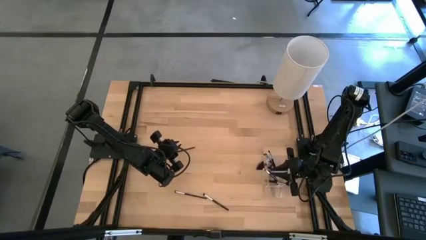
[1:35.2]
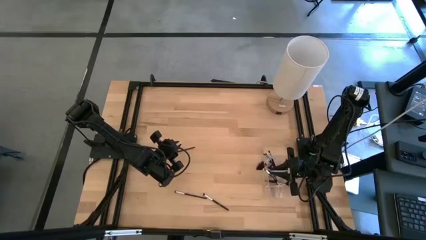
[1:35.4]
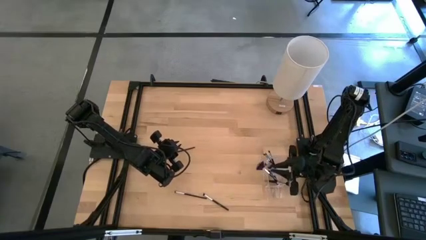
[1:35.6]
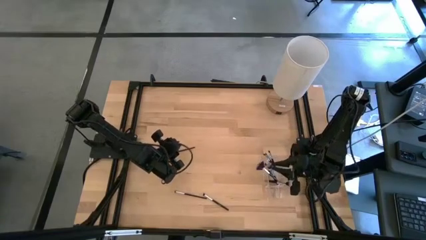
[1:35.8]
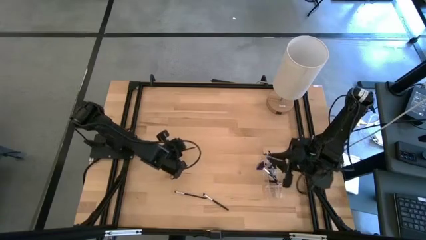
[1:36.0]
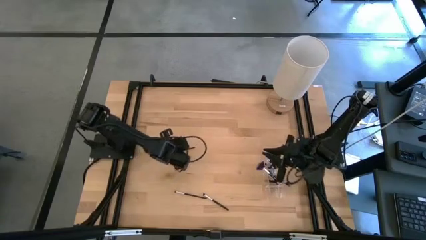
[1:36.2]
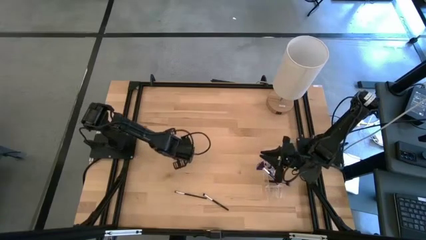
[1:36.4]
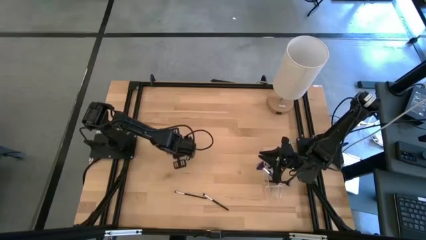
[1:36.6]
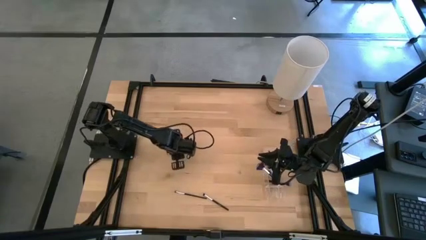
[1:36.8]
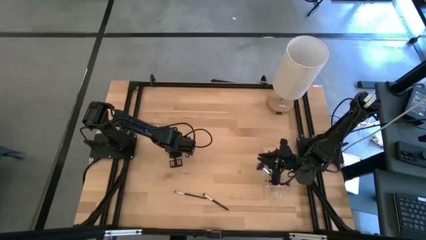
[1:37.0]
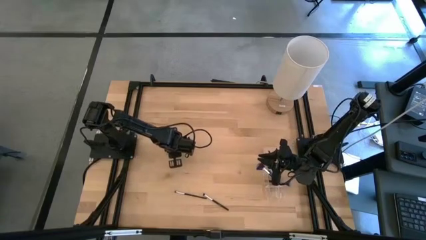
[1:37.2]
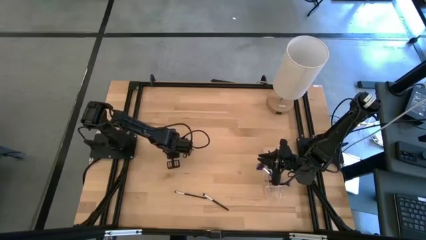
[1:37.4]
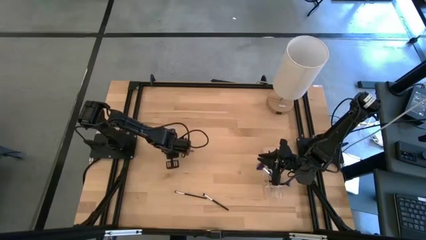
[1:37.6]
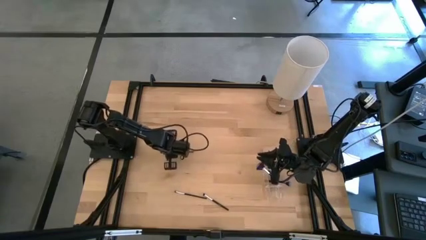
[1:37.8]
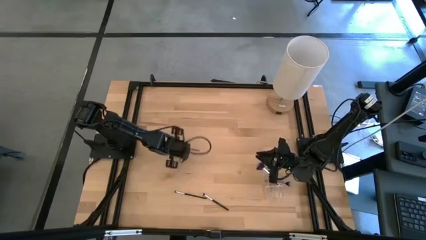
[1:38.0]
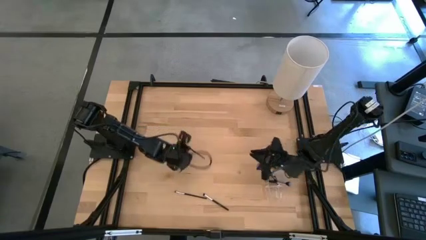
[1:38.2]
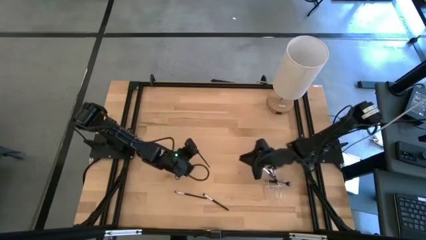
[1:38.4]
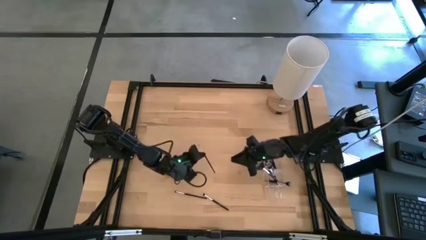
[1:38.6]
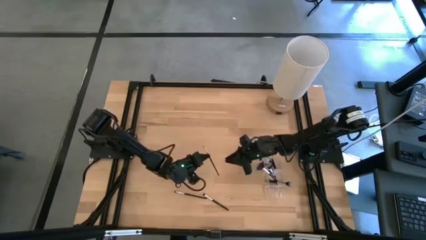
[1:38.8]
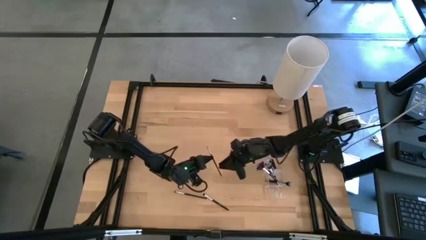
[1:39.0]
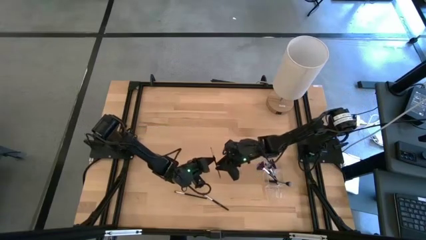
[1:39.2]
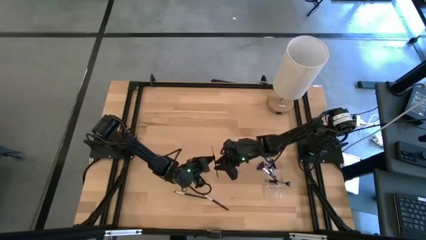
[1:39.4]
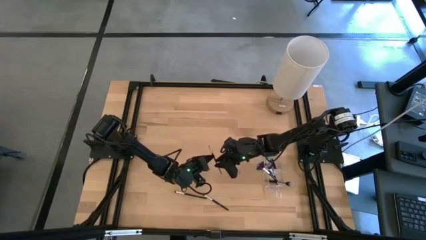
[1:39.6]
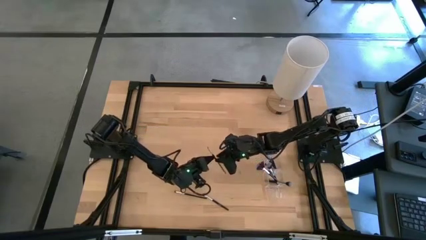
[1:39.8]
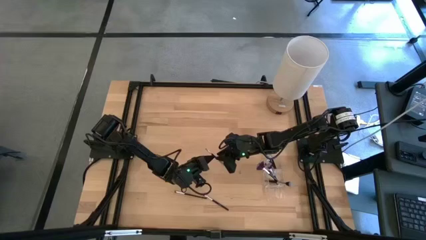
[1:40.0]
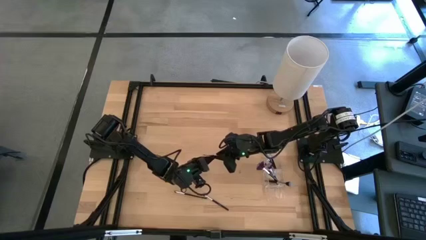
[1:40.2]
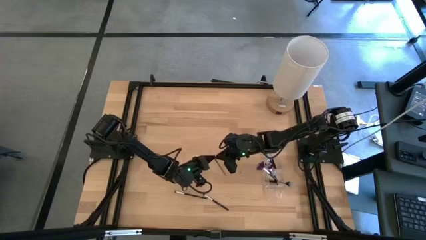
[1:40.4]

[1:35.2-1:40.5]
Task: Put items in baskets/containers
Put the liner brush into the right section of the transparent organizer

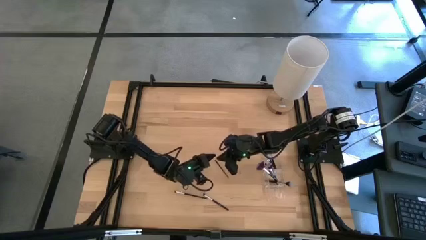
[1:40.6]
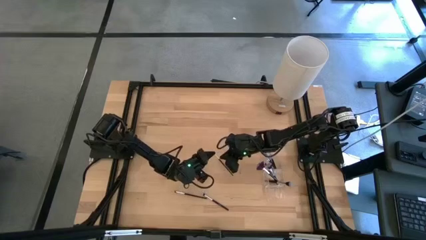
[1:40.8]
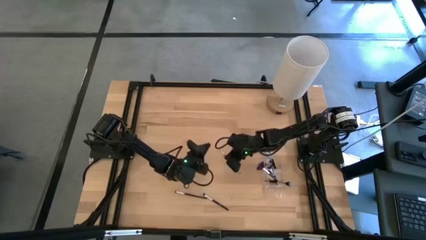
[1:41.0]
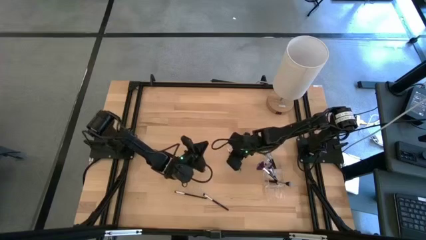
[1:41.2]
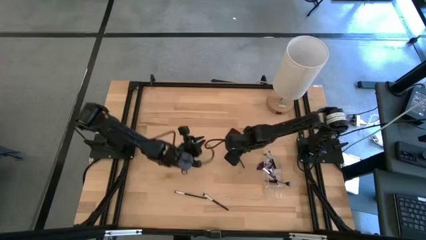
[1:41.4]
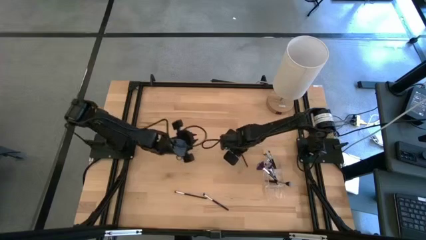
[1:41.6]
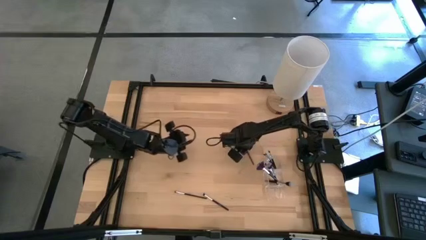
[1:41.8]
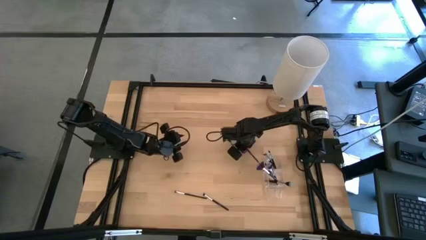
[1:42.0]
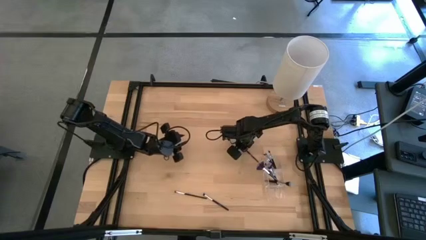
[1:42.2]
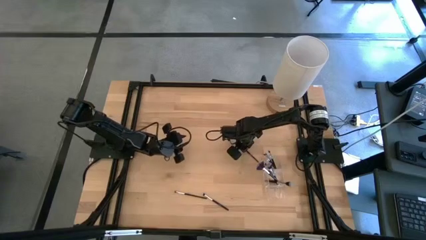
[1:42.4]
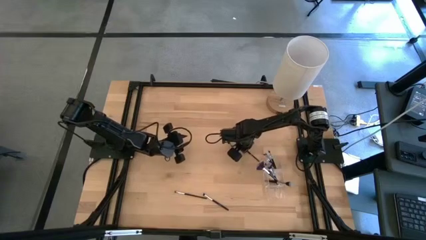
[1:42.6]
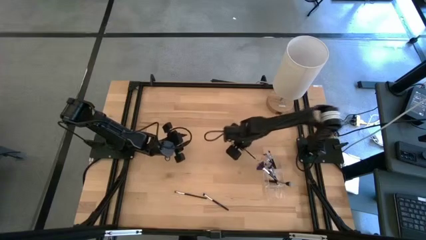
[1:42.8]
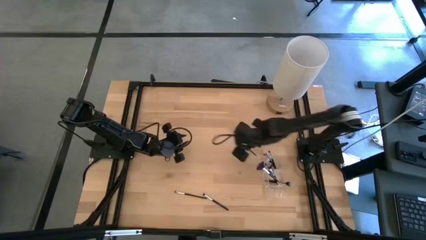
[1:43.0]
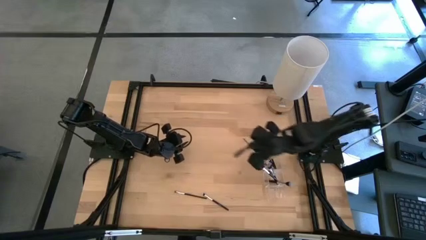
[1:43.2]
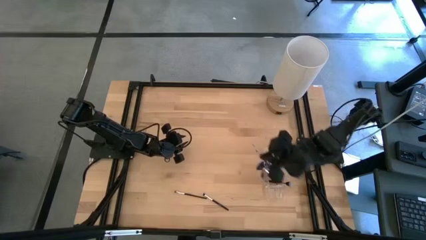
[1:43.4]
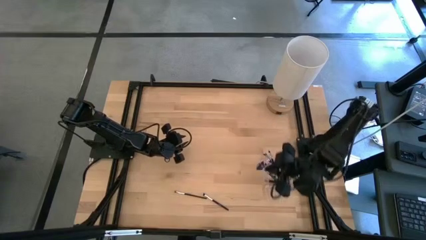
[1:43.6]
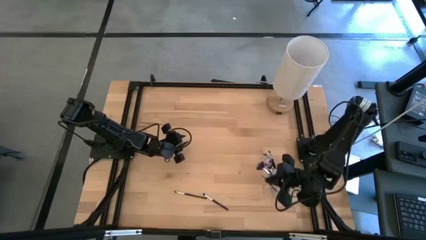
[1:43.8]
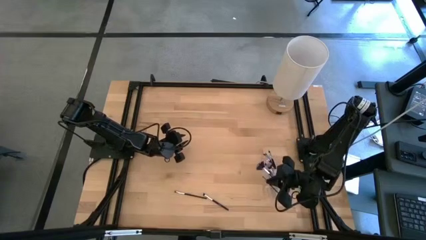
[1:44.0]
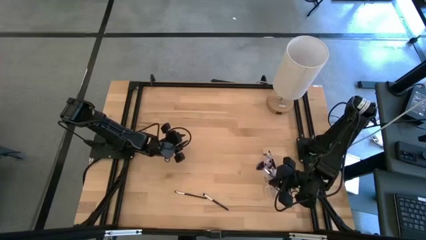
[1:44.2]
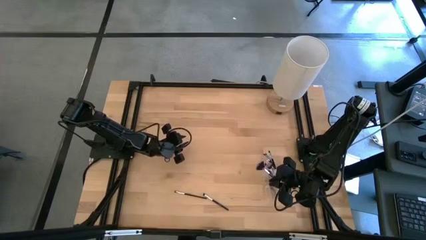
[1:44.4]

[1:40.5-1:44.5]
Put the paintbrush into the right section of the transparent organizer

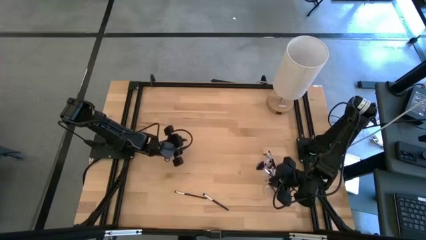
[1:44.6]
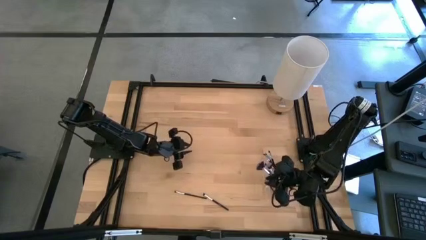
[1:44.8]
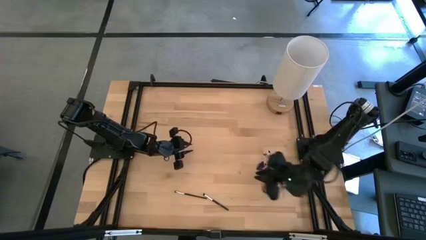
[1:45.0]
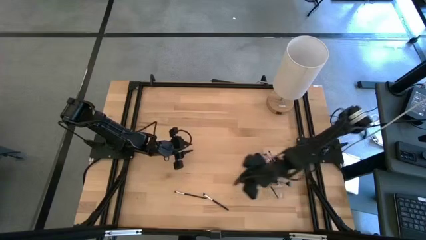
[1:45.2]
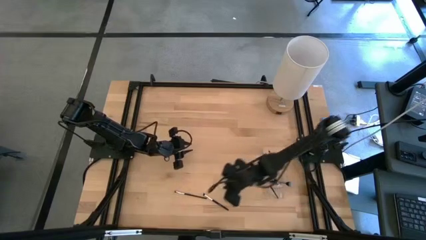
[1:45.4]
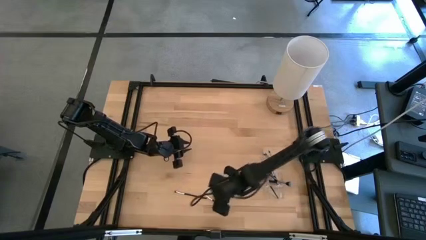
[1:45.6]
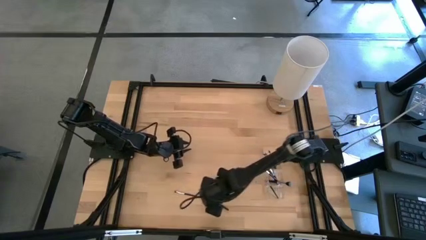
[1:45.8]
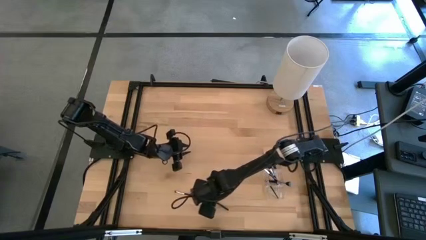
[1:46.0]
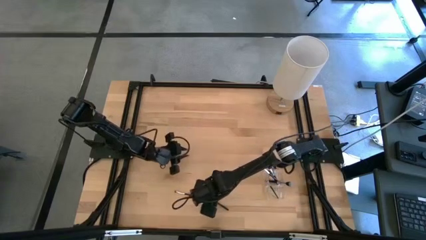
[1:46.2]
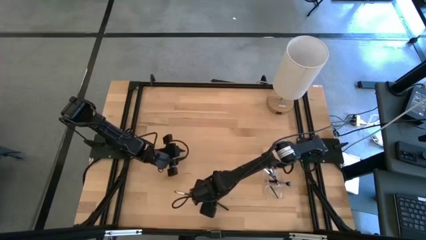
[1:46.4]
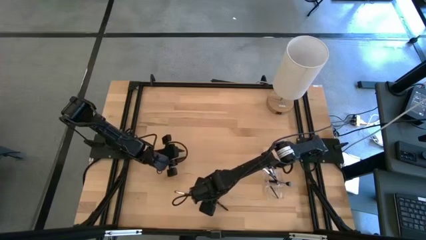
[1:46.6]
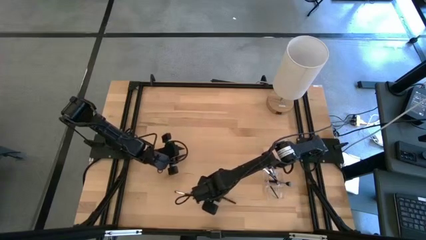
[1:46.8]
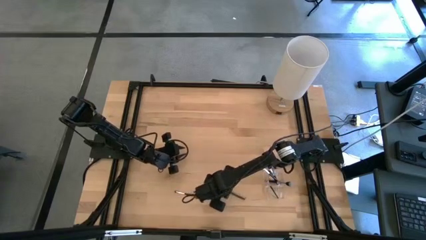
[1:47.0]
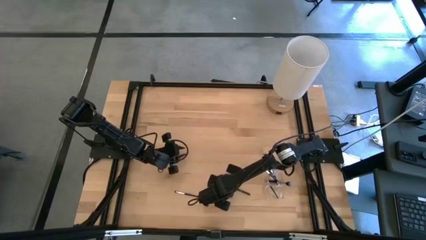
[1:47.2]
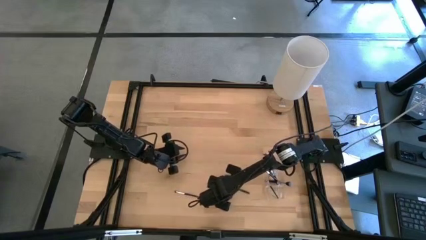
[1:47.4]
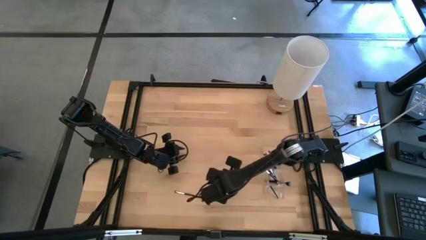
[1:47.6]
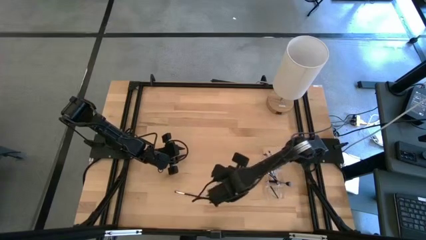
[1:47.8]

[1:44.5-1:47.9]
Put the foundation brush into the right section of the transparent organizer

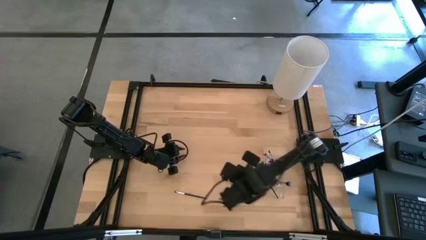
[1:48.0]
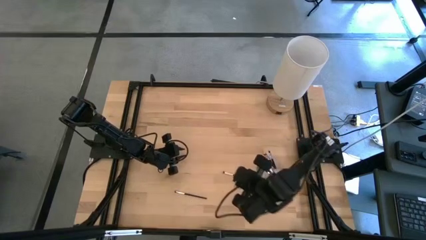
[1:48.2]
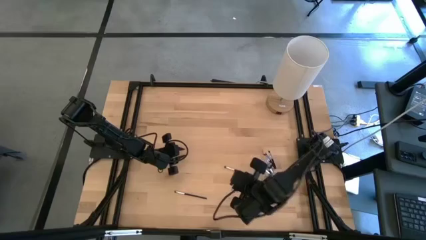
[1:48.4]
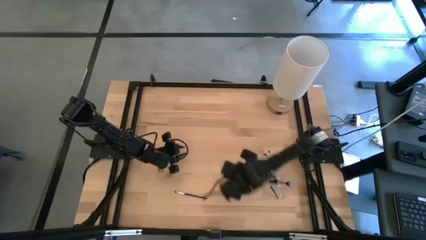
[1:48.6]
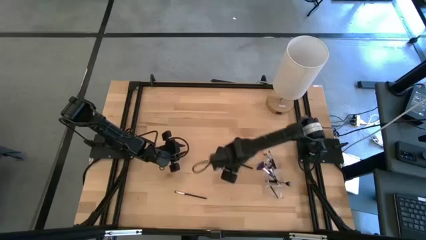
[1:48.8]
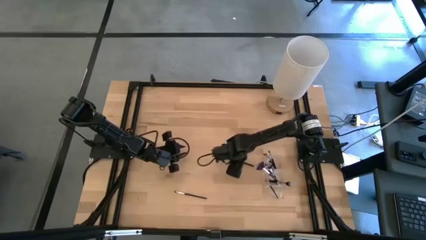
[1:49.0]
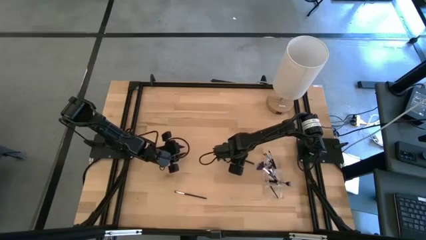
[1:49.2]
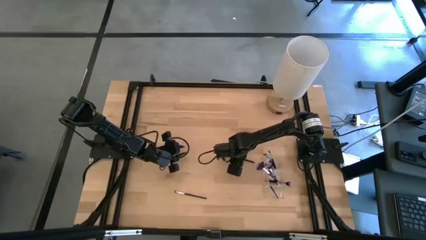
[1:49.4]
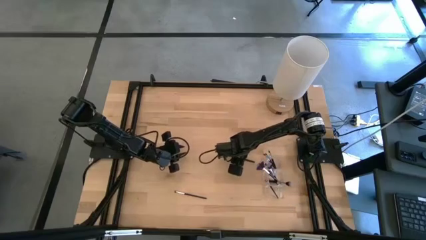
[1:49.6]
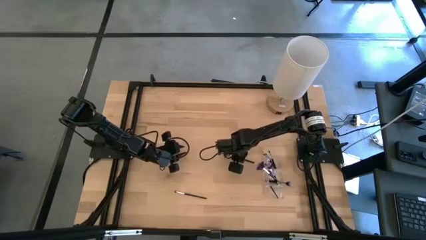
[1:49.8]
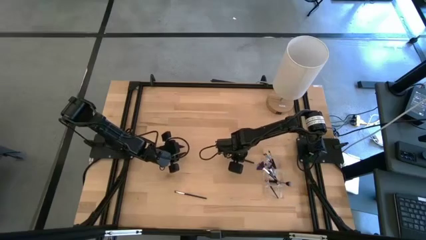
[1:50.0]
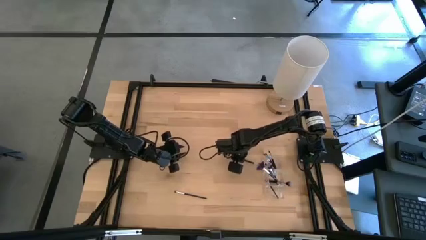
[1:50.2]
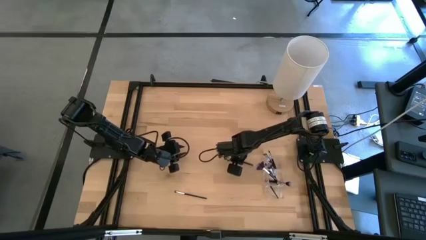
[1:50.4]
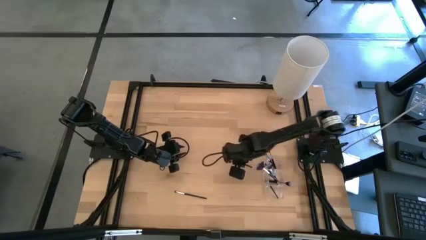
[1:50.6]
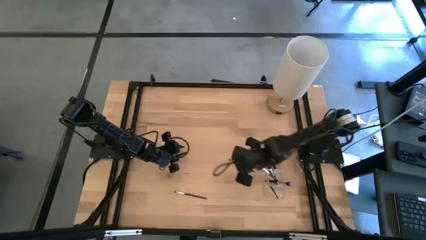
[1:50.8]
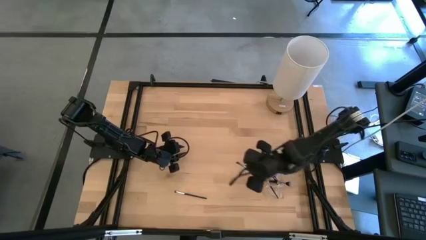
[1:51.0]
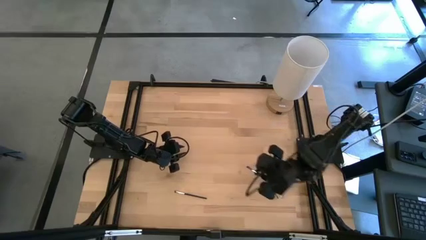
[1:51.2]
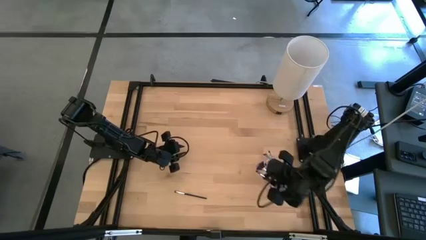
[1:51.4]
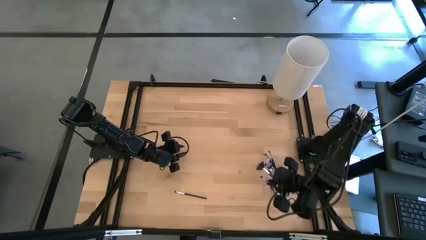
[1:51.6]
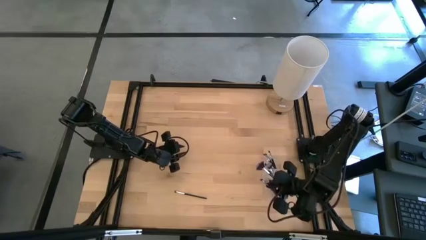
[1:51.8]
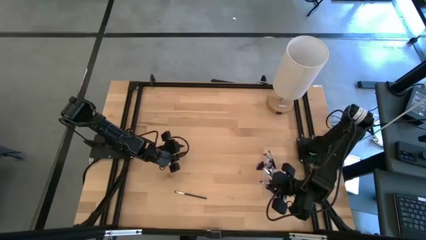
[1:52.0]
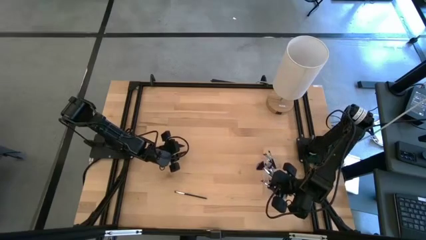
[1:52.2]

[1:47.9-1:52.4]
Put the foundation brush into the right section of the transparent organizer
